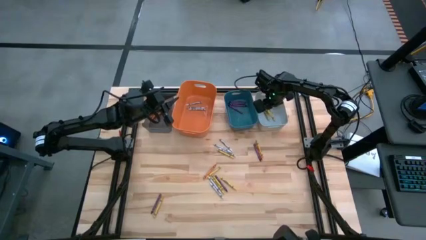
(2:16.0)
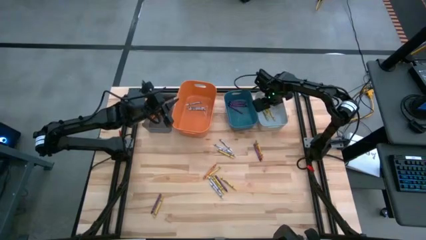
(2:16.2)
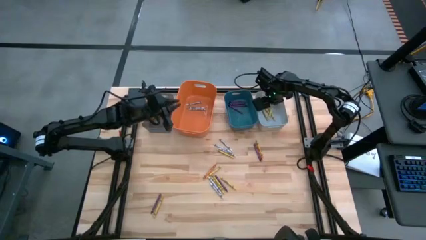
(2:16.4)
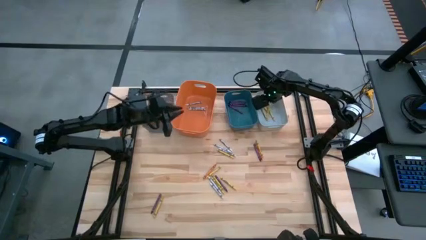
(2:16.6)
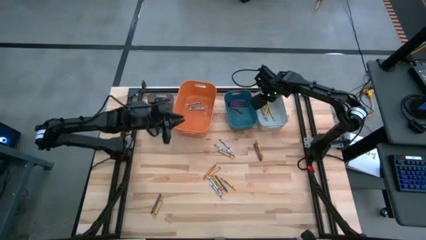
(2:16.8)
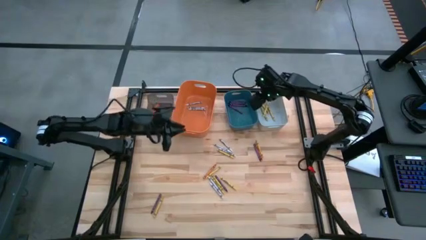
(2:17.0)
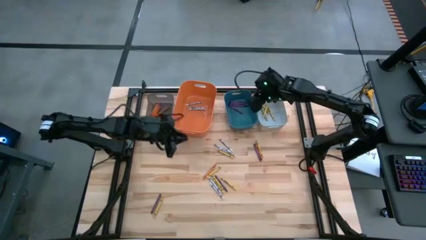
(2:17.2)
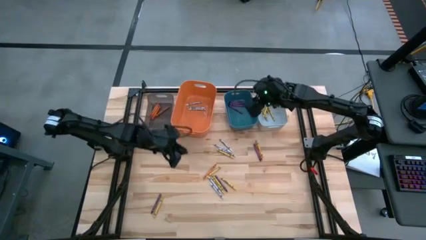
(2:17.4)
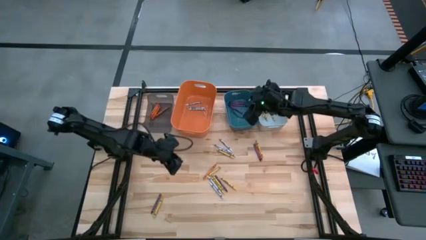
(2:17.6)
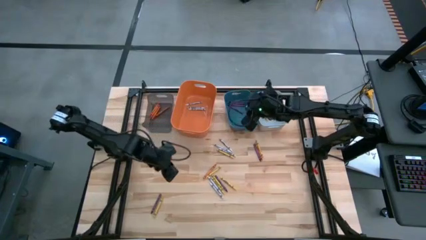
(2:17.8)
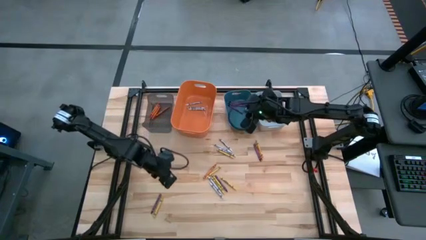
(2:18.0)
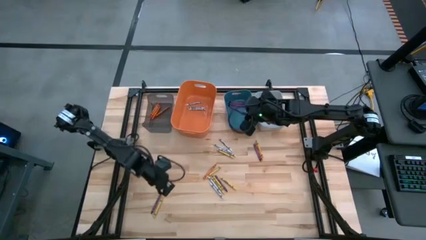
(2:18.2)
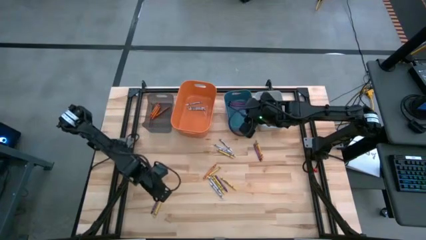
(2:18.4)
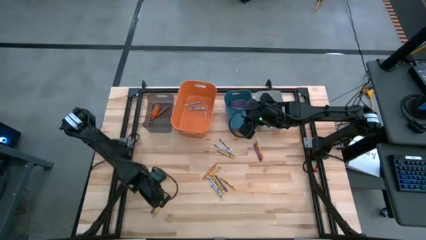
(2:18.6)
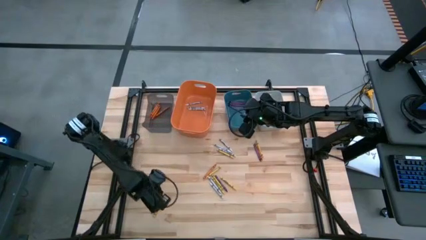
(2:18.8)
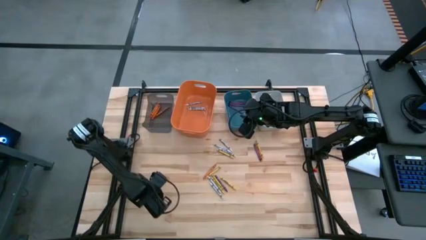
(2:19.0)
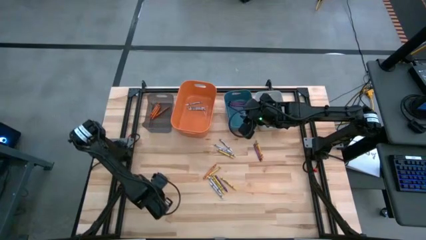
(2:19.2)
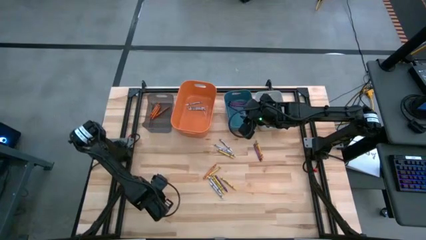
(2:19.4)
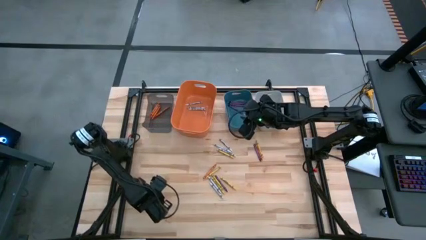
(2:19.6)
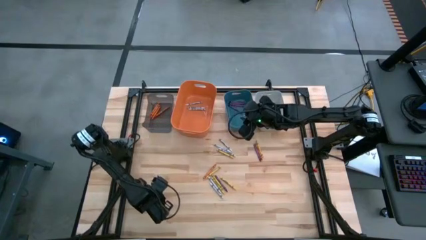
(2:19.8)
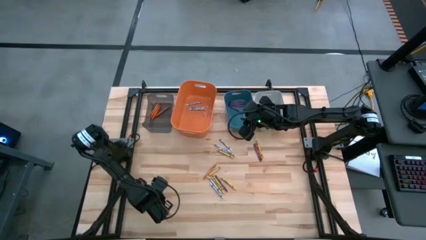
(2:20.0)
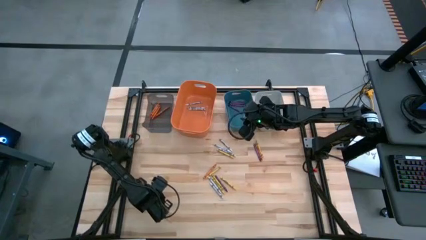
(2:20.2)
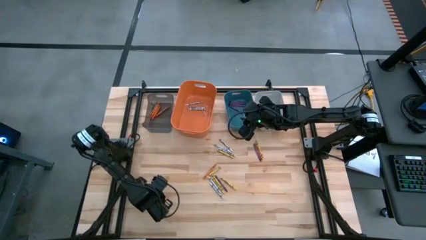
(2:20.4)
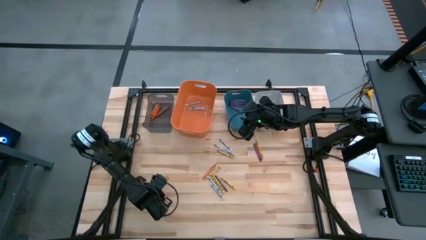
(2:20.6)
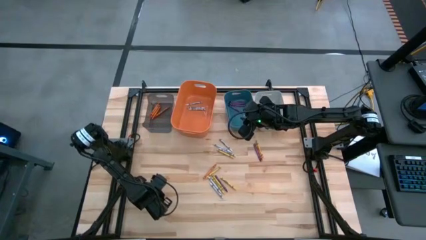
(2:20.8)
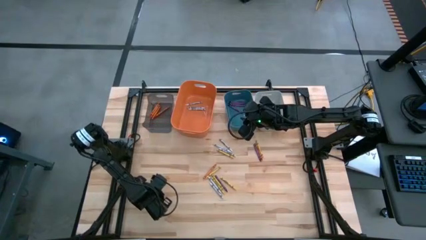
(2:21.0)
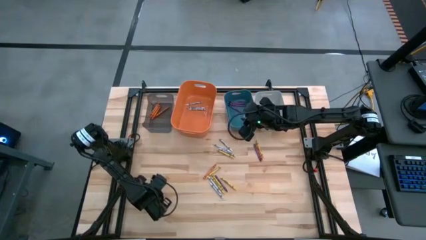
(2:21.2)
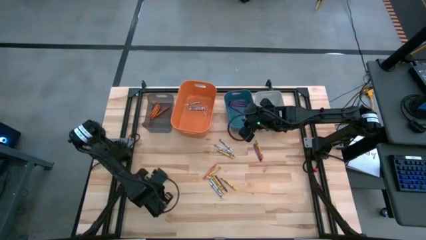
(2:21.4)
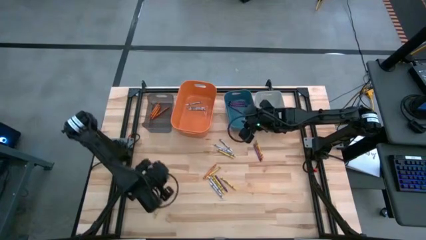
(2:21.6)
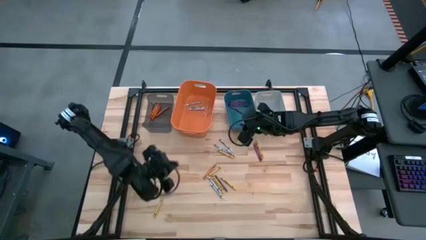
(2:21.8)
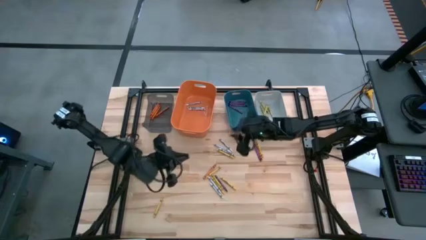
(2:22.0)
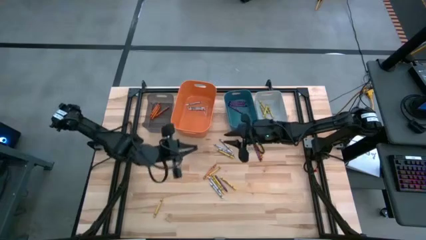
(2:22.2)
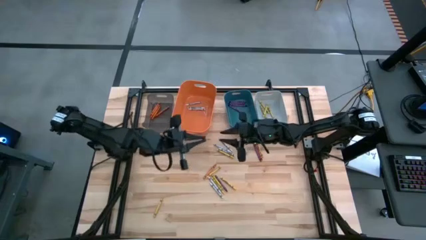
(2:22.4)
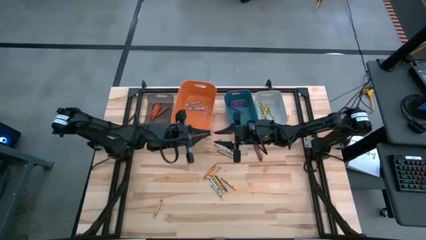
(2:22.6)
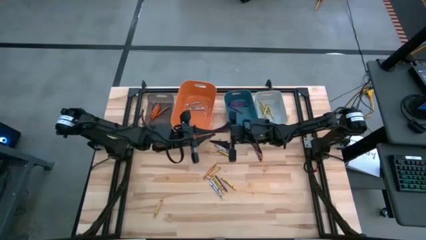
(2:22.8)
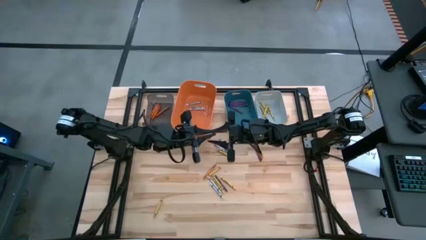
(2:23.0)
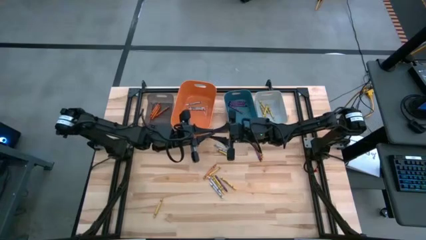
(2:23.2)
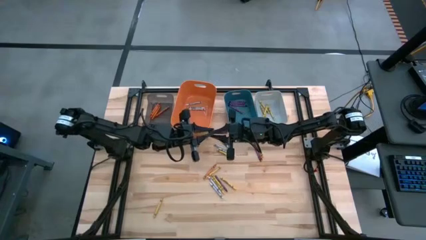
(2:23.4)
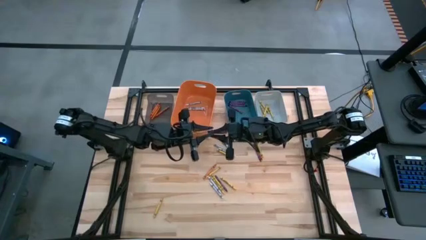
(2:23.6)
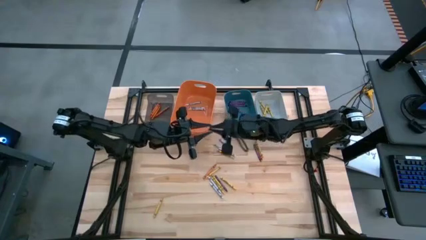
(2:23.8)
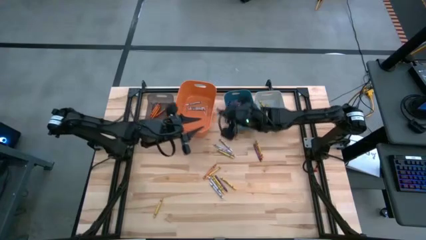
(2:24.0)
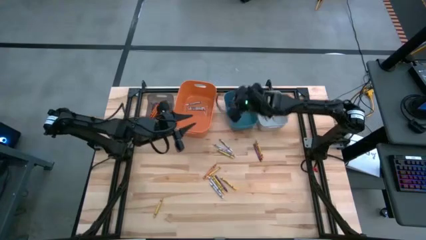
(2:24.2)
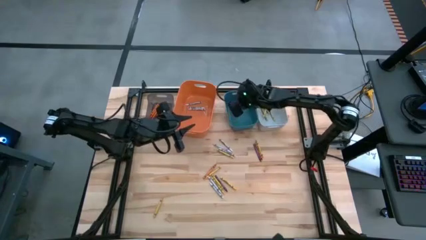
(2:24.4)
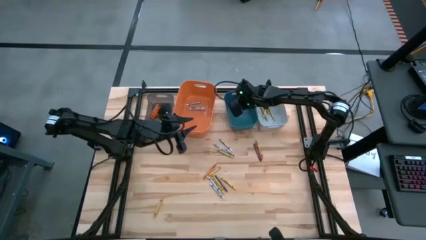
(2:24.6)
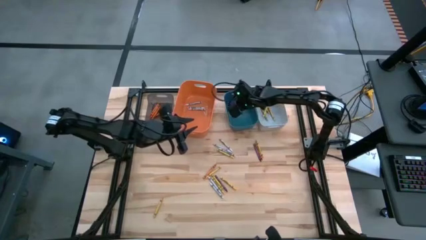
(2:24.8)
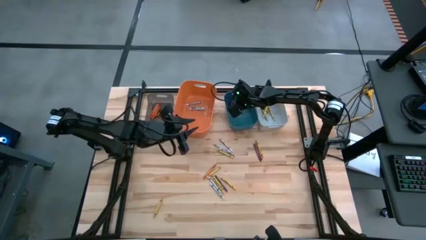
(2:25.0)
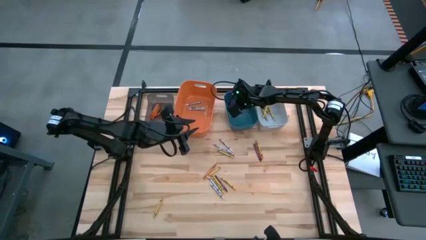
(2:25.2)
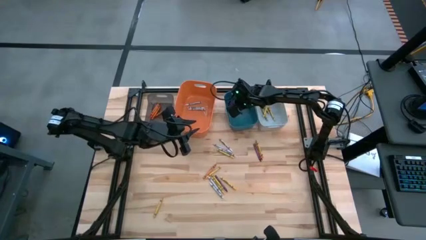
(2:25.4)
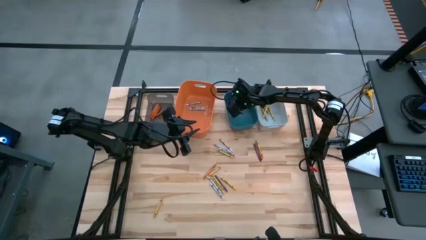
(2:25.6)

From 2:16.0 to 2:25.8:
Task: Sort crayons
Put the purple crayon into the blue bin

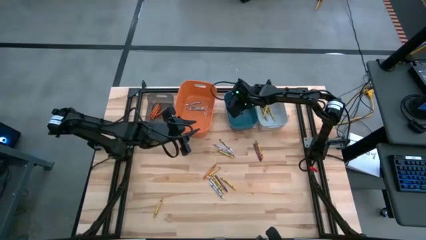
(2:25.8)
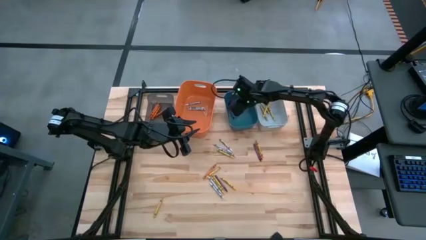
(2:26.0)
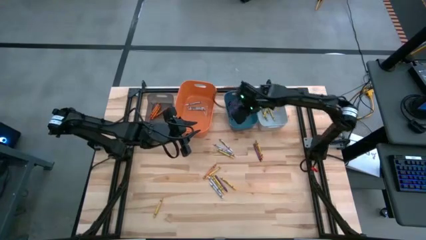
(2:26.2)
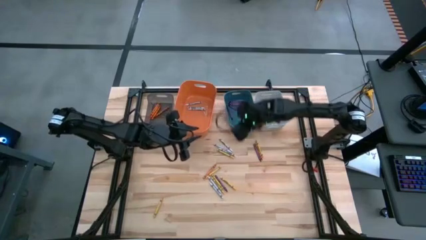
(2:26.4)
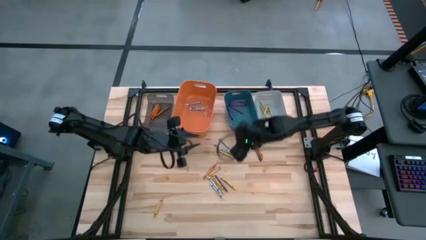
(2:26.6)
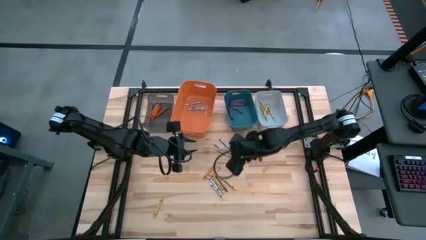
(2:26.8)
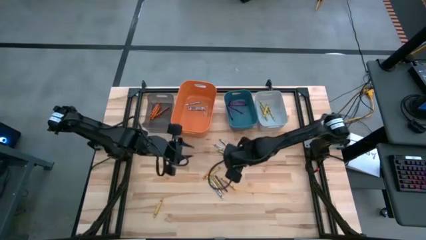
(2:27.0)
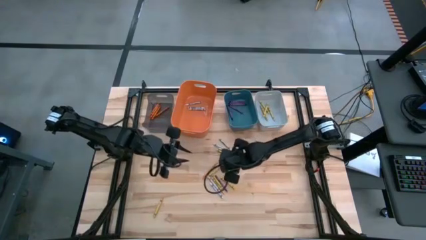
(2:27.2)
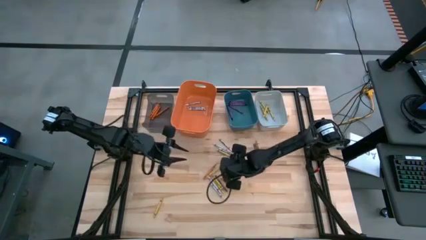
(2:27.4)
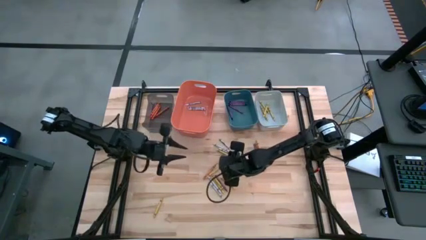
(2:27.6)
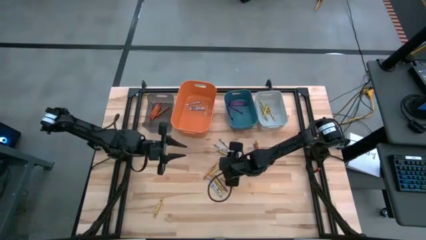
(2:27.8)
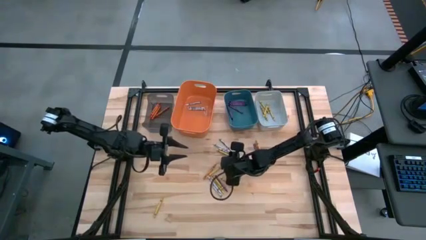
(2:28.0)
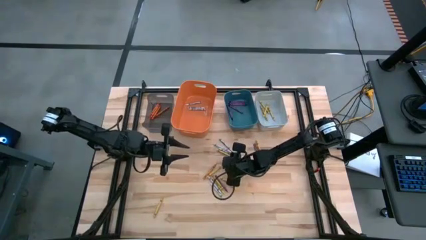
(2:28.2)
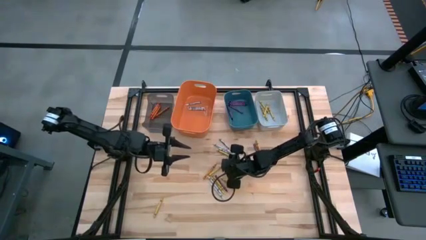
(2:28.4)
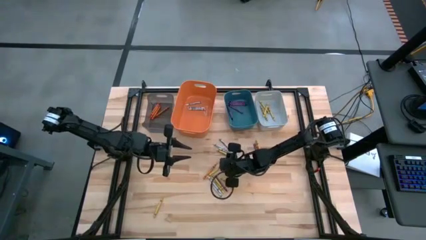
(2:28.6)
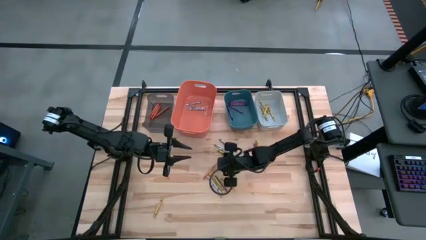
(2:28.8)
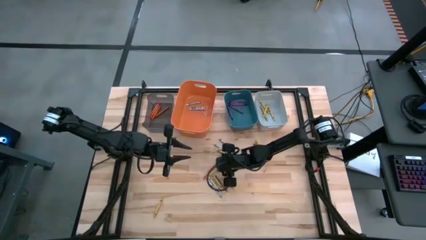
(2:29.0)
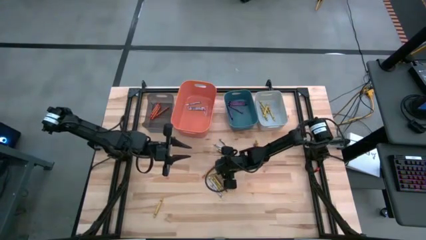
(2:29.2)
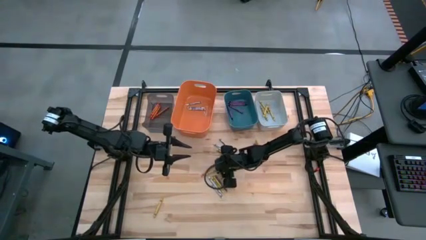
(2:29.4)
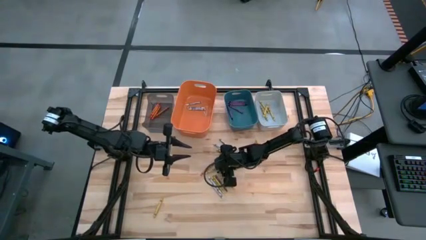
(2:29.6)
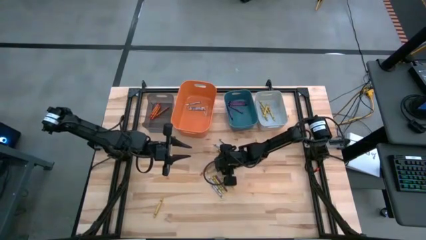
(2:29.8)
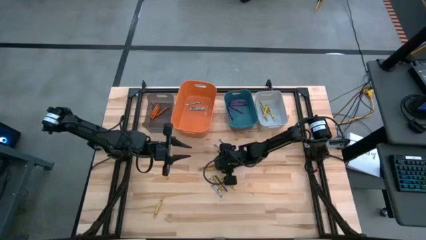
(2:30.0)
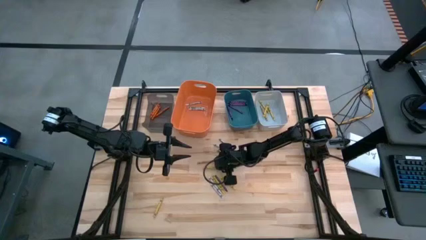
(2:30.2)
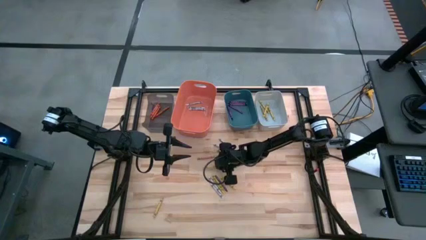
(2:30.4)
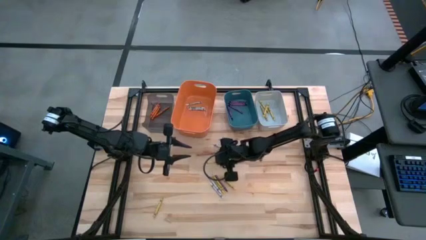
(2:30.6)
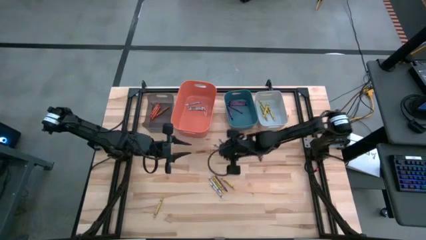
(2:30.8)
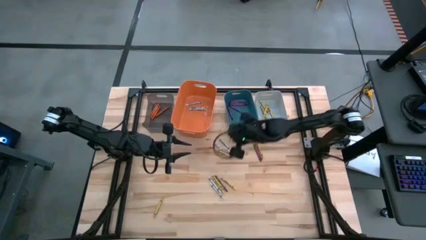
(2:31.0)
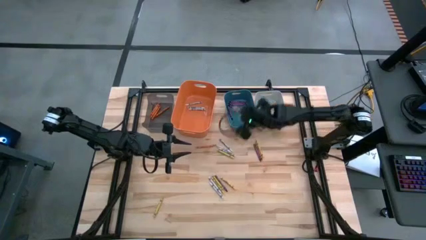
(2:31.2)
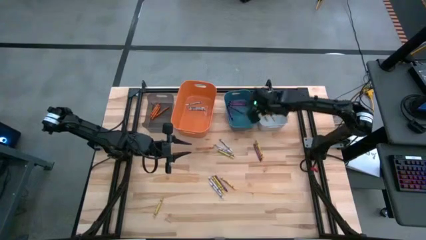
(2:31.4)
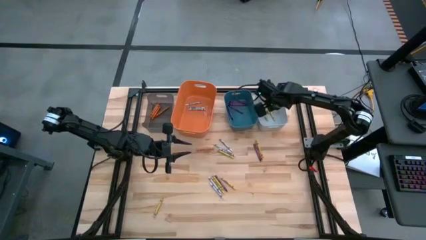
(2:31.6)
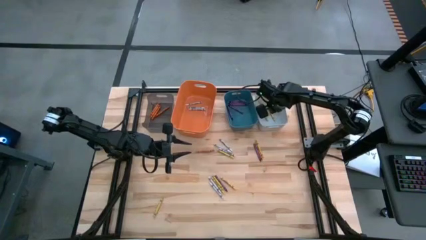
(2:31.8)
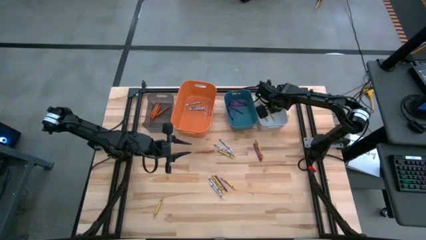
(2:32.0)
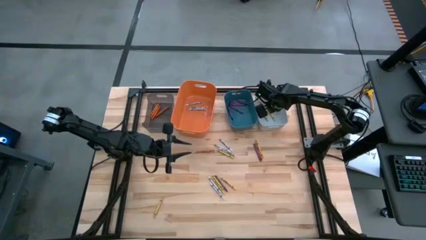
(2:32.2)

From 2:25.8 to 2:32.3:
Put the yellow crayon into the white bin
